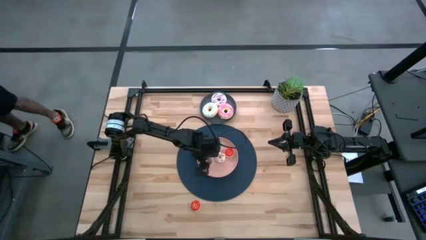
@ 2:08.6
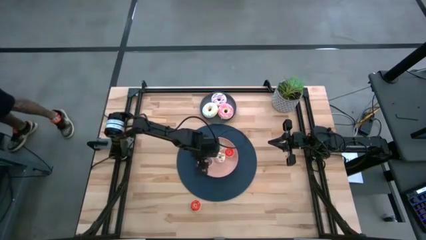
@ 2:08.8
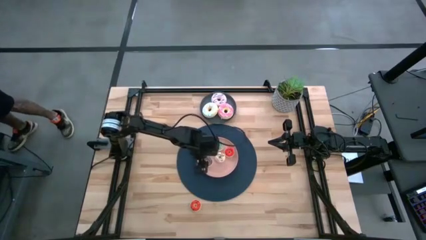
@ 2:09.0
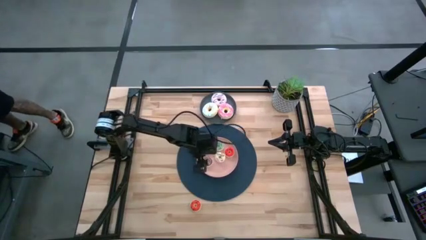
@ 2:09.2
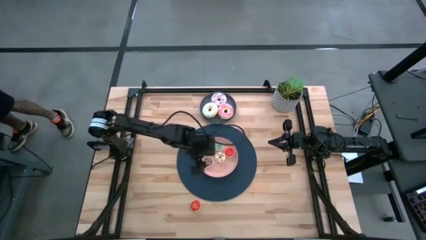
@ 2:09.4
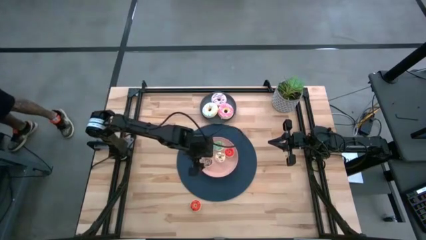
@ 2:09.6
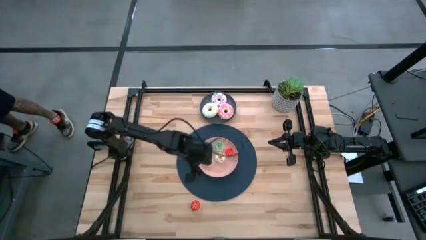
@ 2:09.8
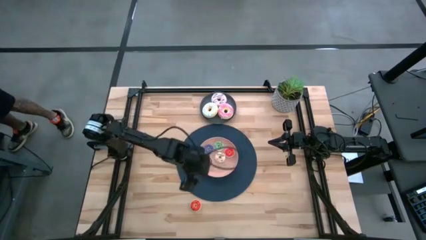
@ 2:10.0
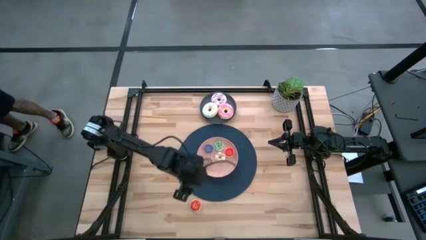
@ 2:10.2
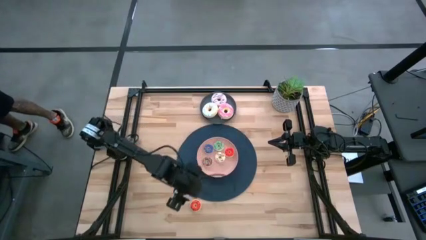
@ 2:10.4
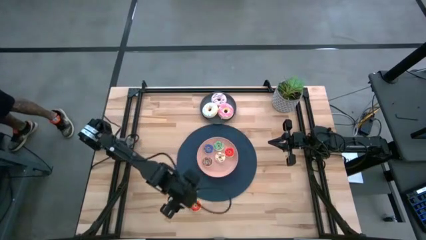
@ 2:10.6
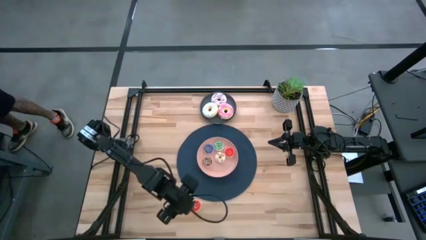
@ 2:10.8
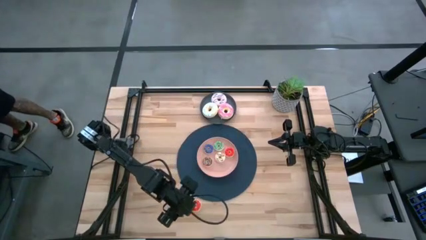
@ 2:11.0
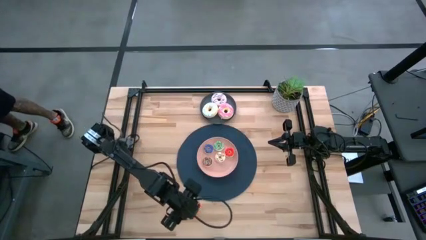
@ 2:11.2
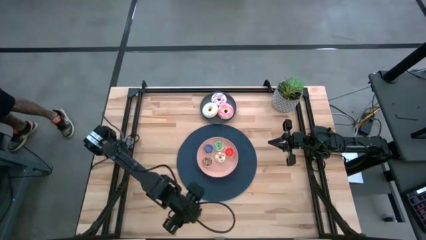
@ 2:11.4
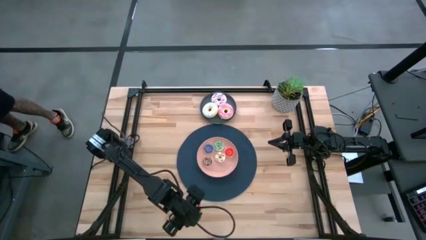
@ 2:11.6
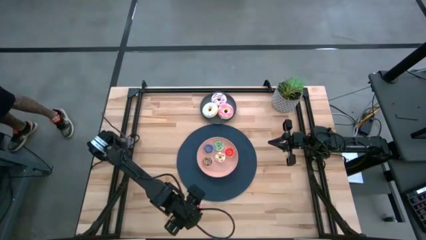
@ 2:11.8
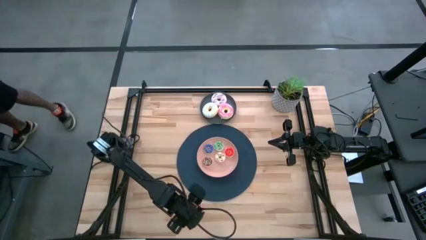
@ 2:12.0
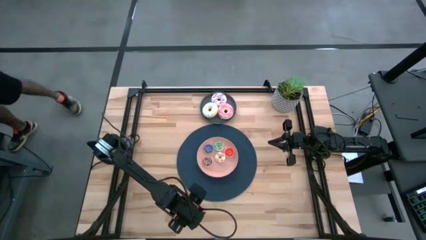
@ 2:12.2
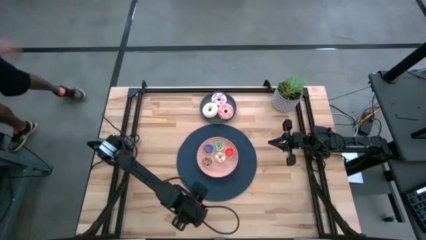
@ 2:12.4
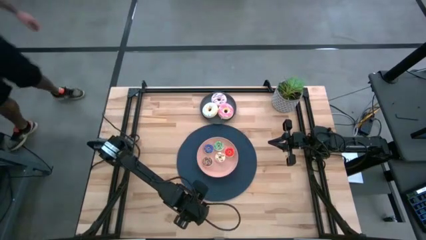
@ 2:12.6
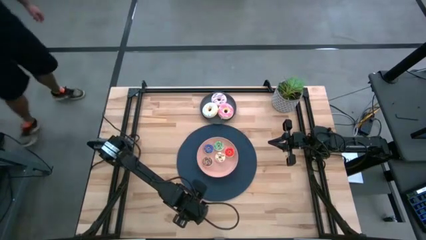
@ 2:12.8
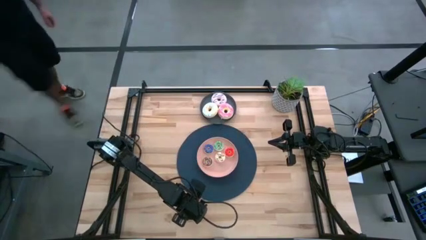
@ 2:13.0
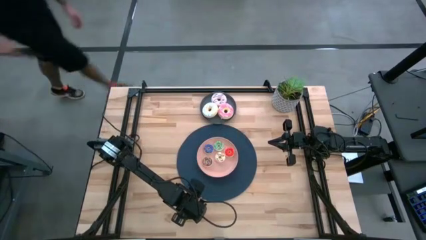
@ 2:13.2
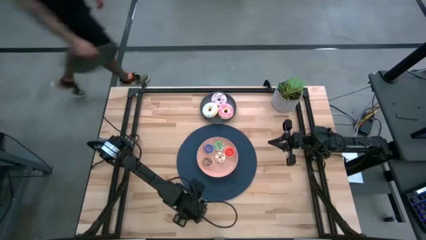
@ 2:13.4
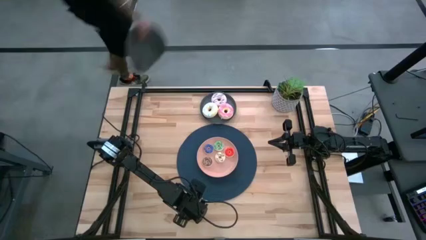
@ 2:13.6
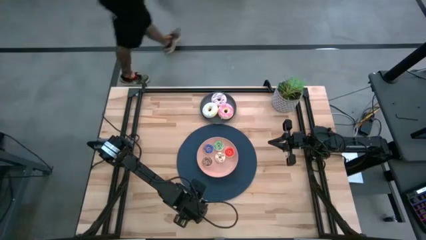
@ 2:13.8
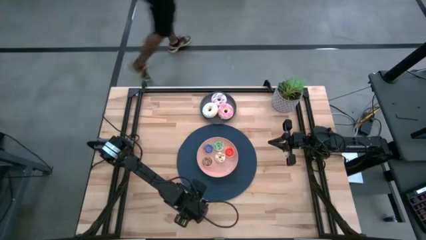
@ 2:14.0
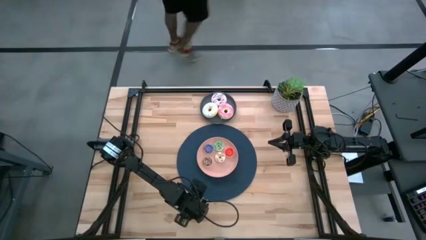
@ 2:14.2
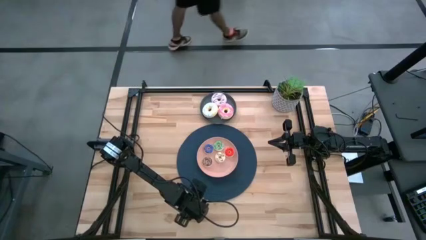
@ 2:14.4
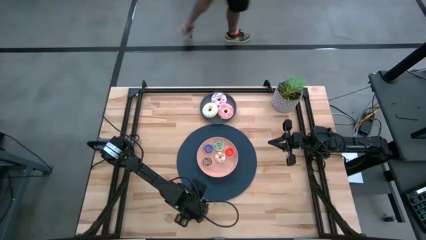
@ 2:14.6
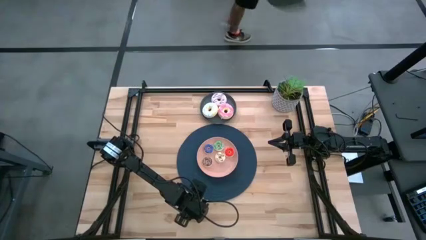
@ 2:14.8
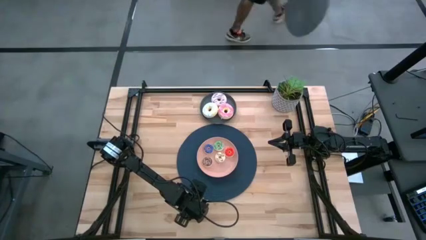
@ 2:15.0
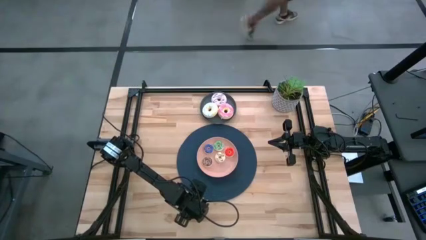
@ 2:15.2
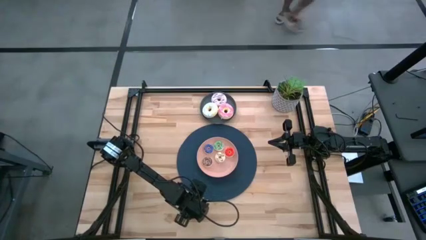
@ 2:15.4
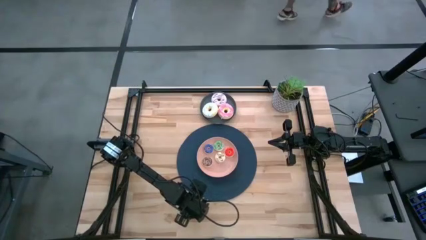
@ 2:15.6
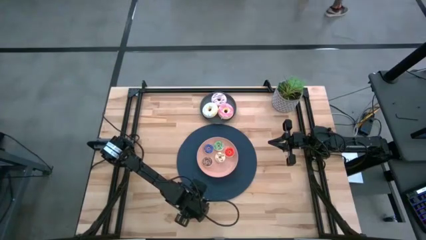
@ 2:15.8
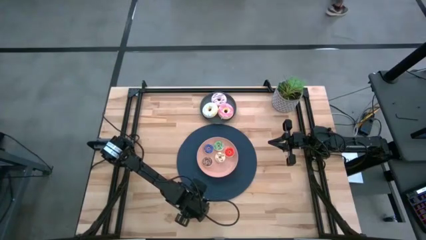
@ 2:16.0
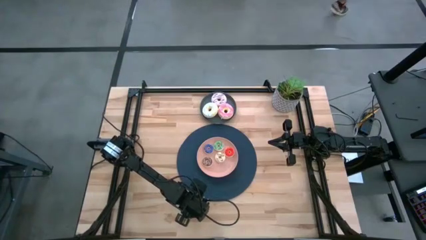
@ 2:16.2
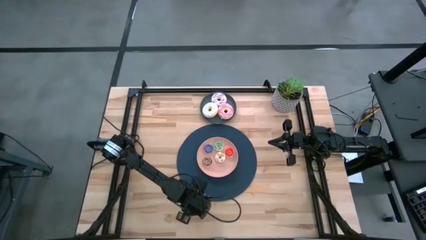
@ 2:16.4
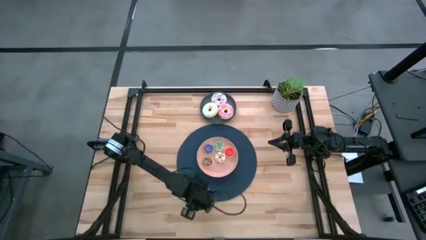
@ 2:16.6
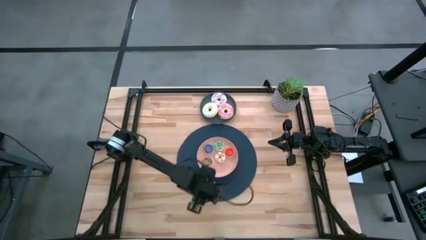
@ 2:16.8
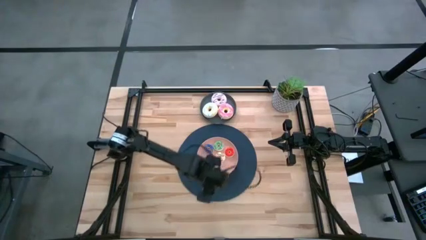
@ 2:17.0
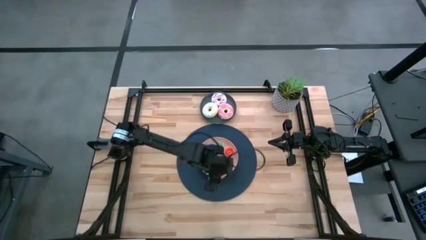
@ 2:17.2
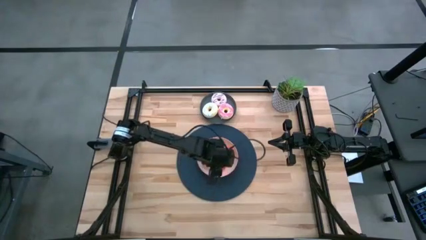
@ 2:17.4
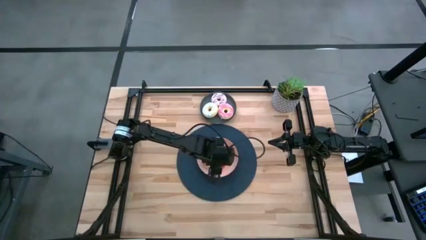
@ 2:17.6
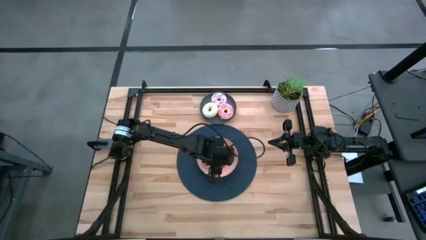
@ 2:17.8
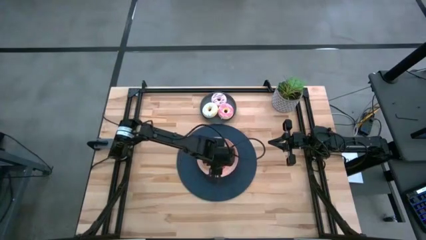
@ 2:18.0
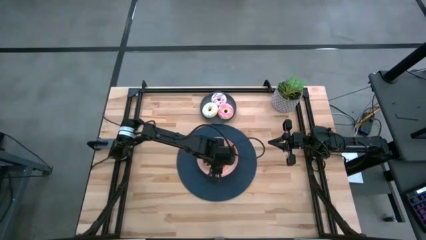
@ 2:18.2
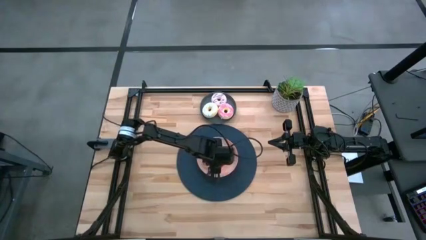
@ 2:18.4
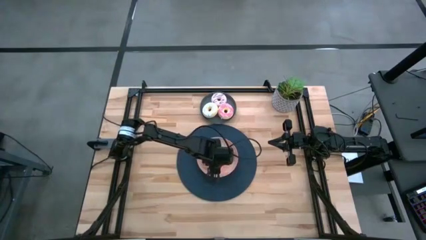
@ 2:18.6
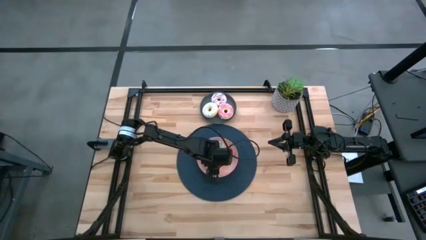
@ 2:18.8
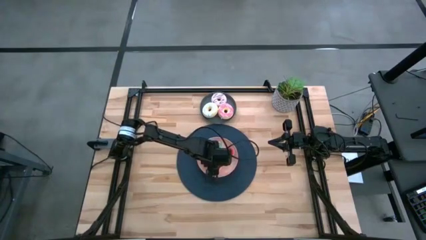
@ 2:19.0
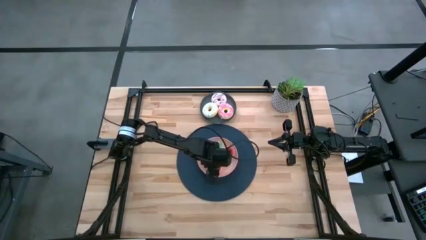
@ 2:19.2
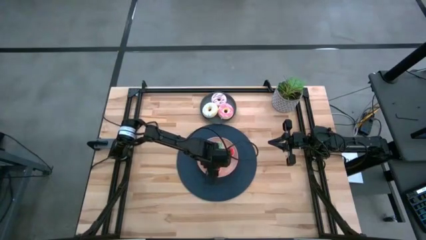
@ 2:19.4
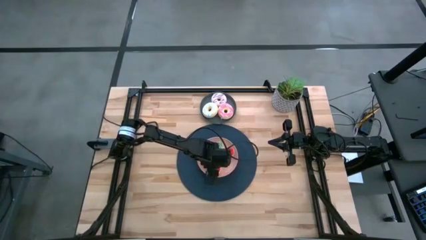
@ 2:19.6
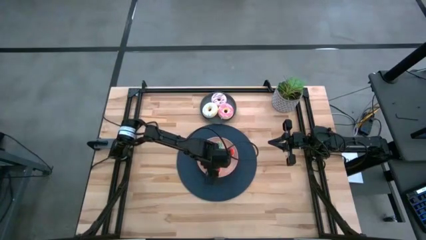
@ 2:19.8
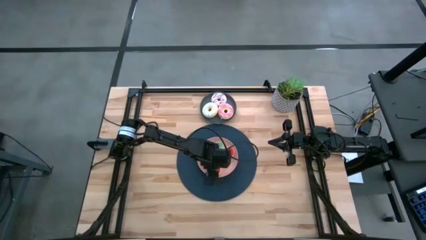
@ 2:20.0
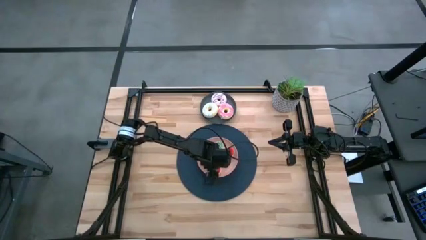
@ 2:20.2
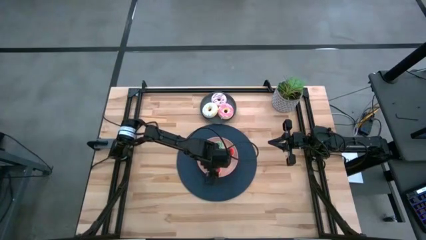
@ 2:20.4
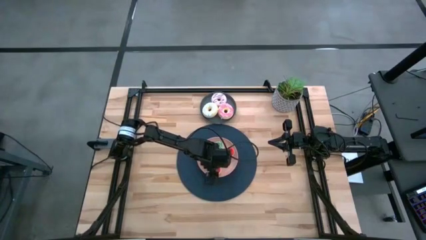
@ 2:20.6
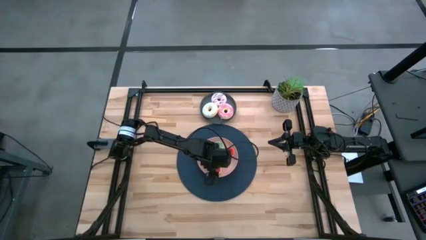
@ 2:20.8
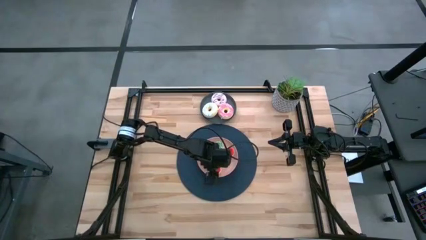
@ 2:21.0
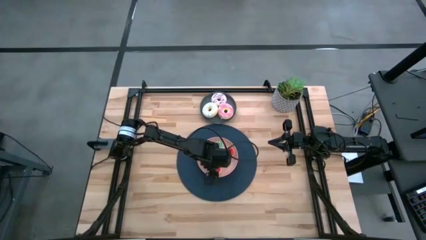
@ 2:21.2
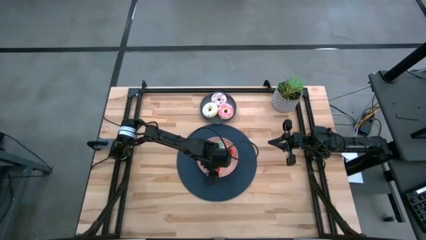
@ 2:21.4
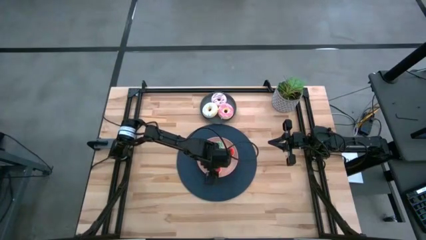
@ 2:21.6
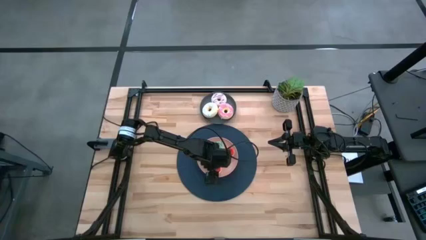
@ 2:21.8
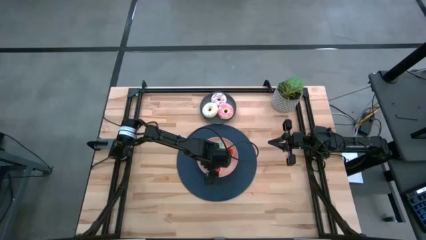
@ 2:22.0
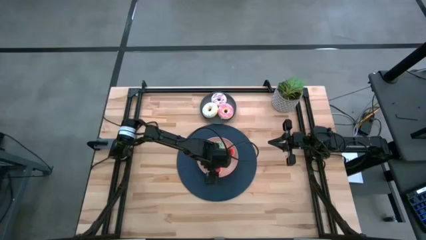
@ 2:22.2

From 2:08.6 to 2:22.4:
Task: Pick & Place donuts
Put the small orange donut on the pink plate

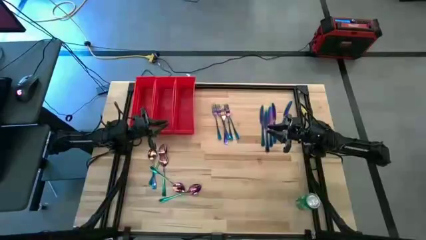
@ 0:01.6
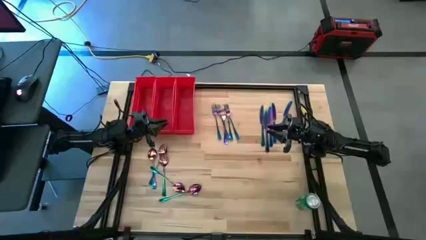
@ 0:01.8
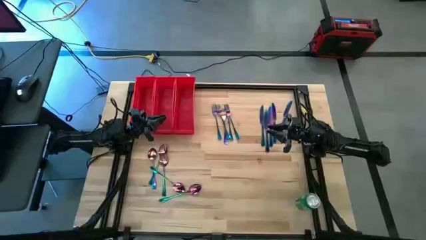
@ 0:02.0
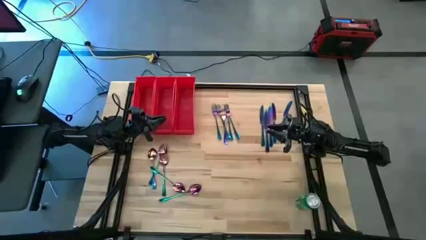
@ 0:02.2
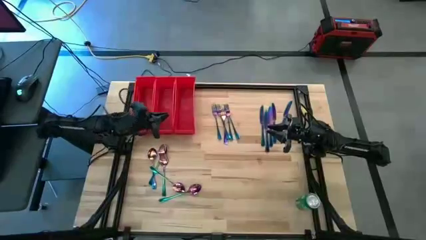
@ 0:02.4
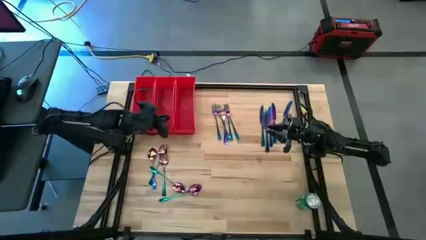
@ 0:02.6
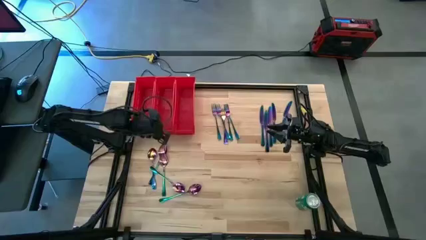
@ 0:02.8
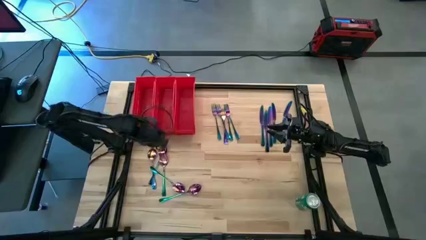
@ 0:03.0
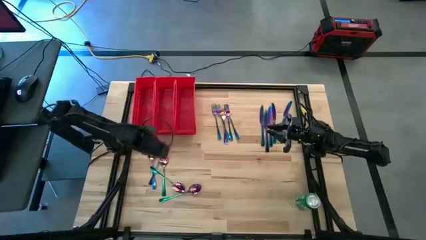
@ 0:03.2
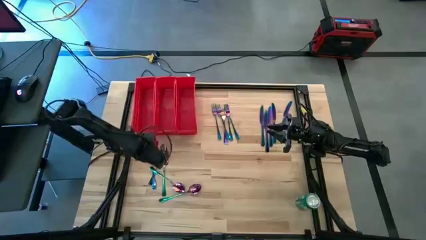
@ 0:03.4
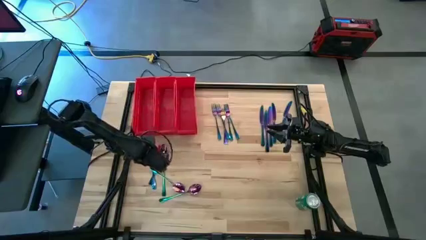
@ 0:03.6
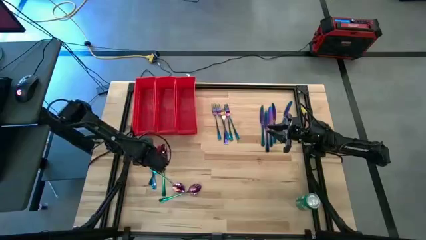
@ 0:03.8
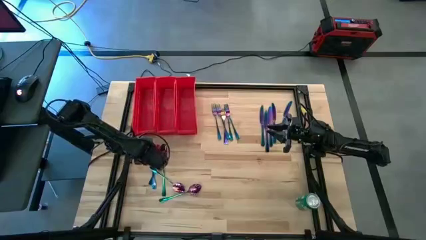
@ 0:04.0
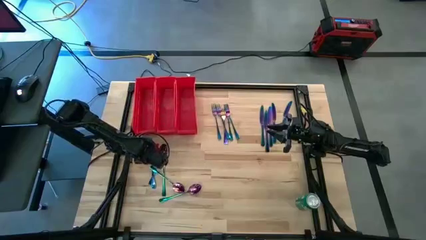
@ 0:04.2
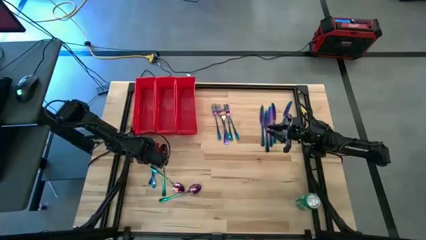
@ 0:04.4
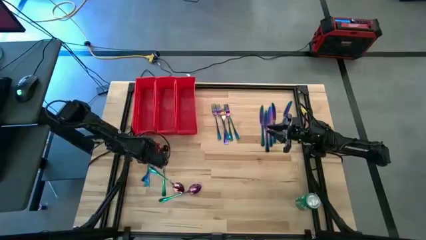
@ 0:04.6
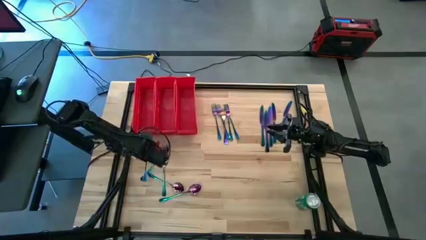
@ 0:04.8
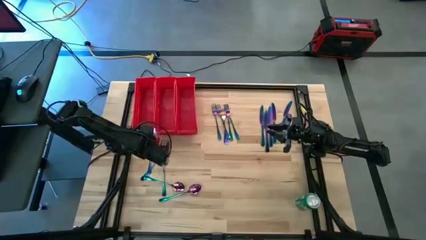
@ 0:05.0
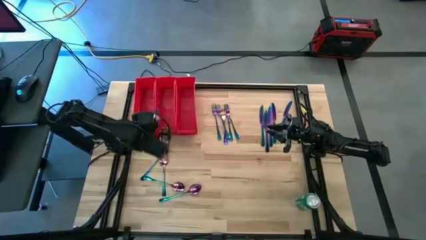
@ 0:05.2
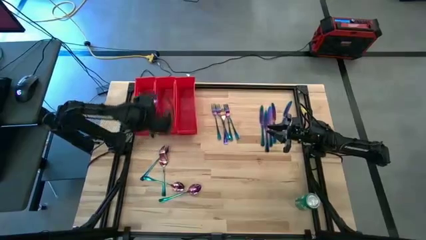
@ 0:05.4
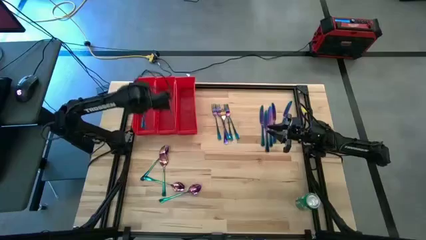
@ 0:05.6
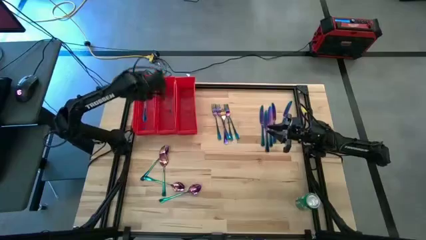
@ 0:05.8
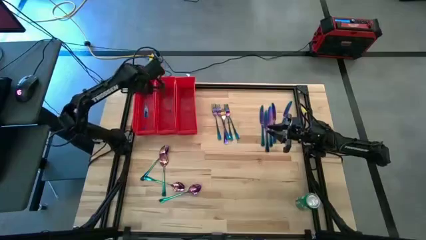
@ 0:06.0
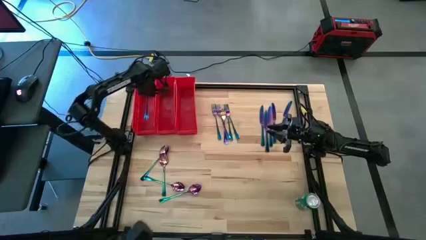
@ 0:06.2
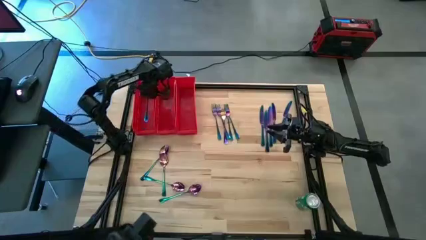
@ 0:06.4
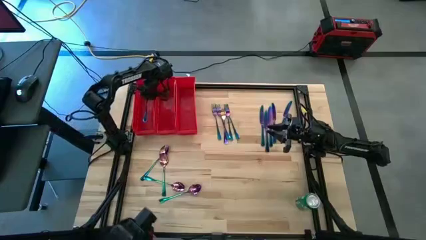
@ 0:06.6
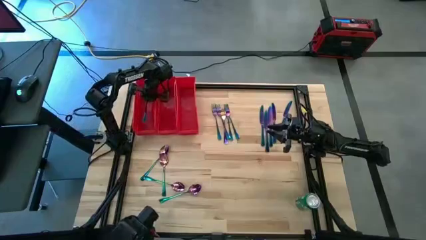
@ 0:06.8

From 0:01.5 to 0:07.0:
Task: Sort silverware
Put the blue spoon into the left red bin
